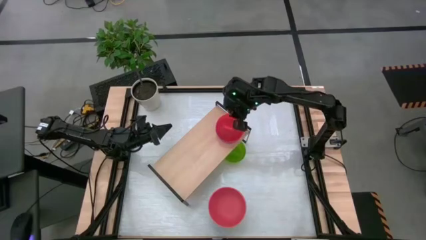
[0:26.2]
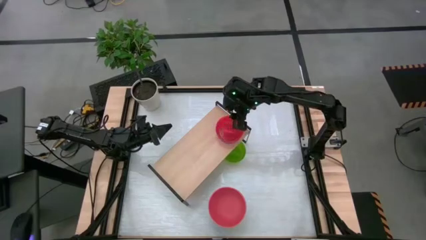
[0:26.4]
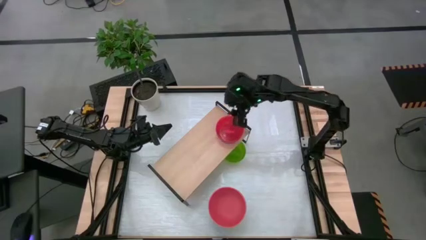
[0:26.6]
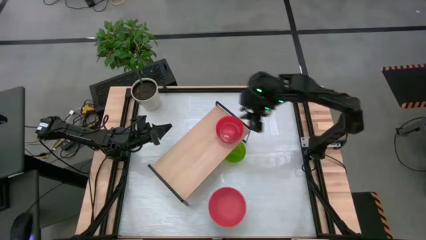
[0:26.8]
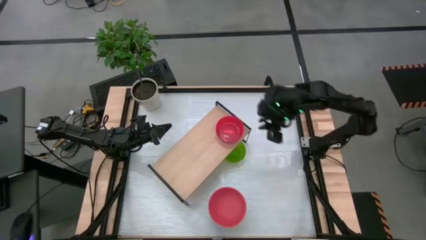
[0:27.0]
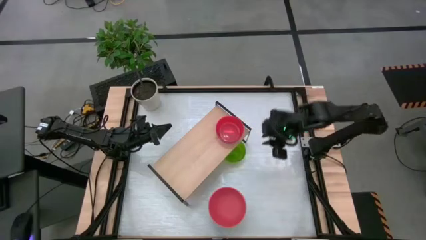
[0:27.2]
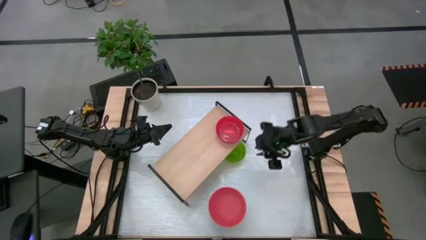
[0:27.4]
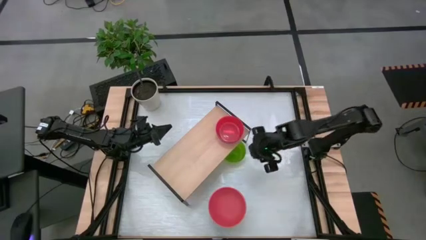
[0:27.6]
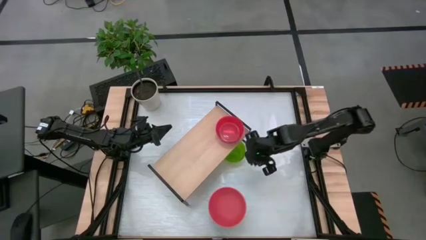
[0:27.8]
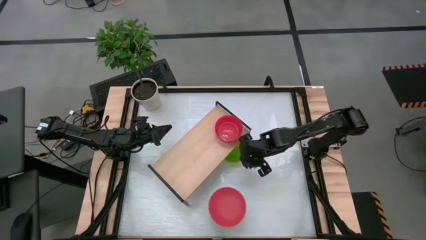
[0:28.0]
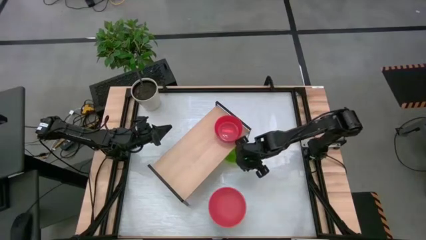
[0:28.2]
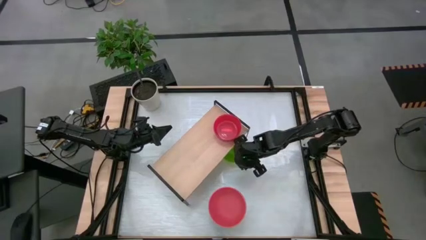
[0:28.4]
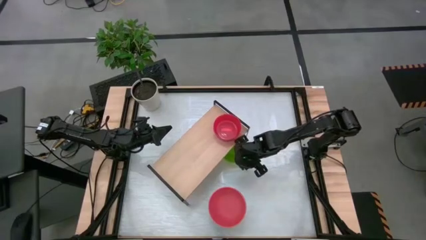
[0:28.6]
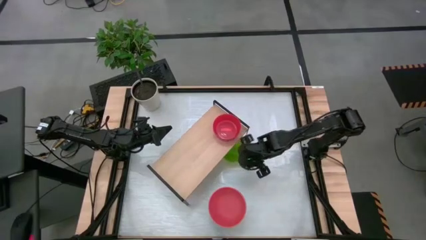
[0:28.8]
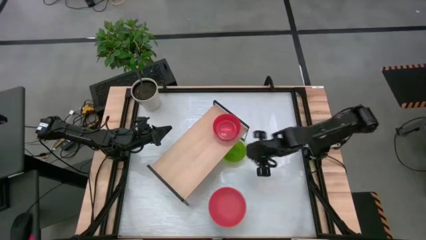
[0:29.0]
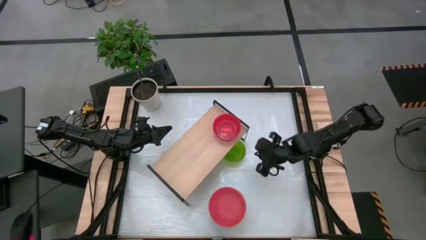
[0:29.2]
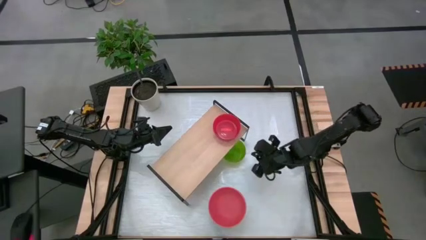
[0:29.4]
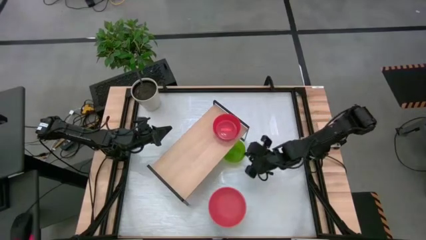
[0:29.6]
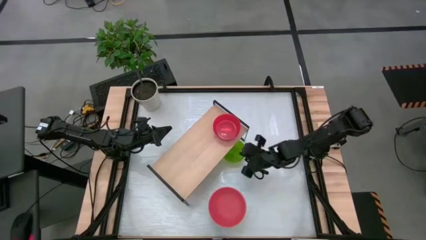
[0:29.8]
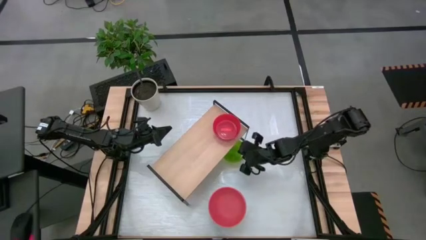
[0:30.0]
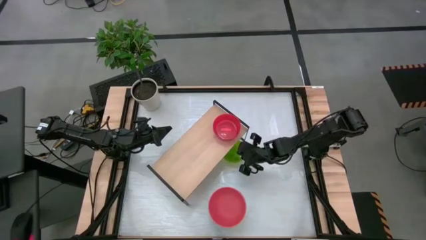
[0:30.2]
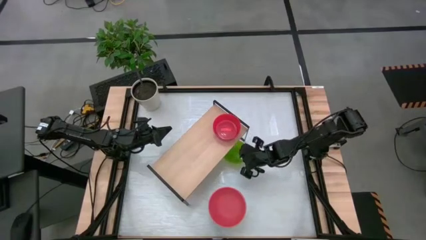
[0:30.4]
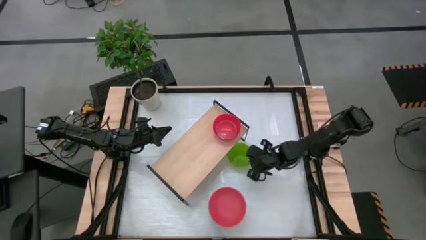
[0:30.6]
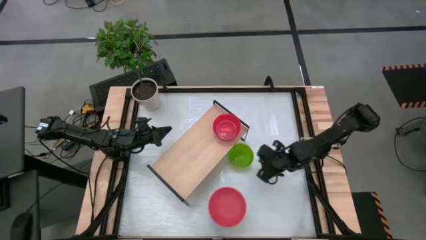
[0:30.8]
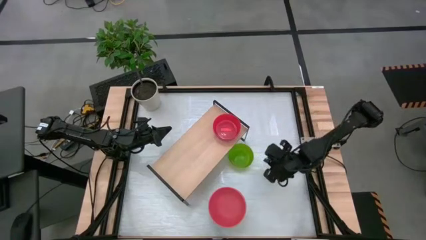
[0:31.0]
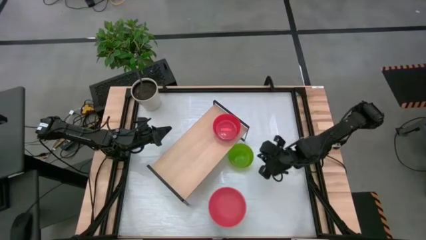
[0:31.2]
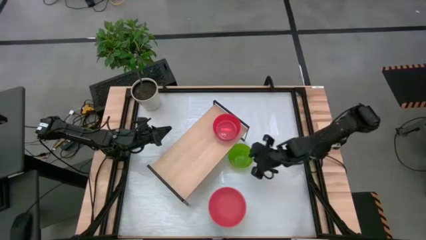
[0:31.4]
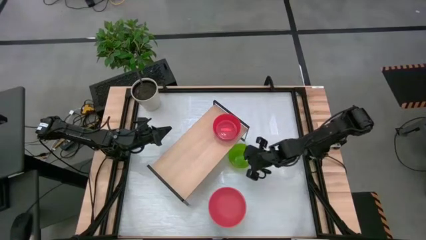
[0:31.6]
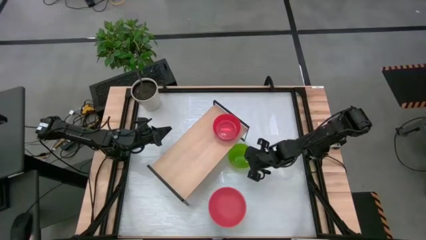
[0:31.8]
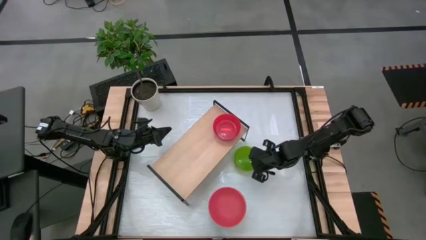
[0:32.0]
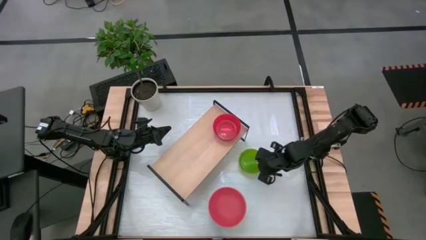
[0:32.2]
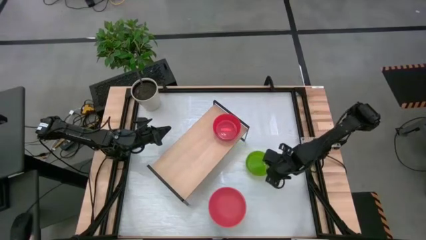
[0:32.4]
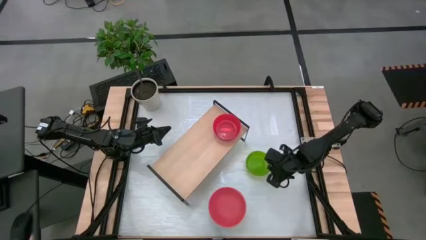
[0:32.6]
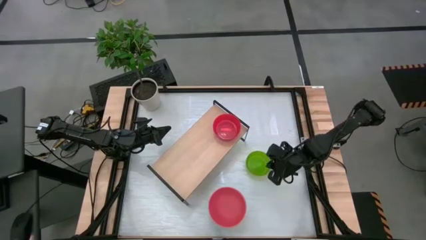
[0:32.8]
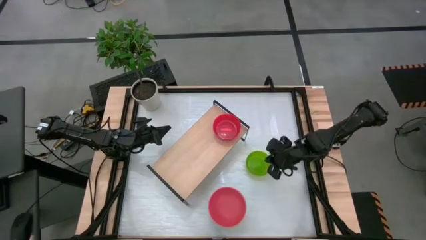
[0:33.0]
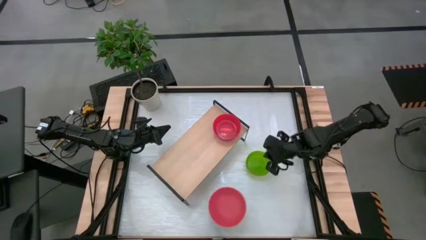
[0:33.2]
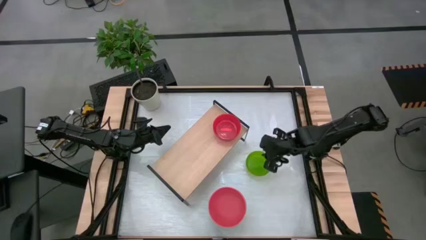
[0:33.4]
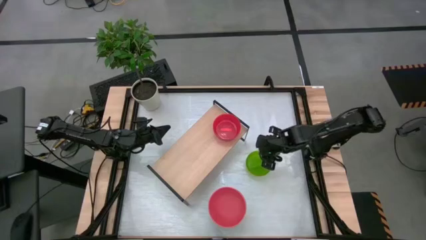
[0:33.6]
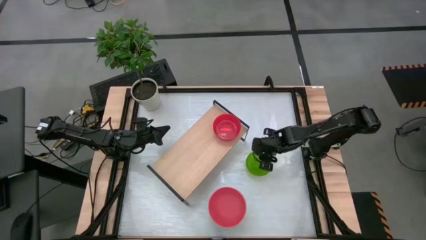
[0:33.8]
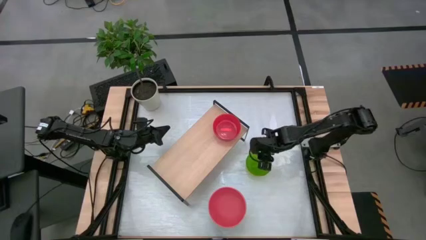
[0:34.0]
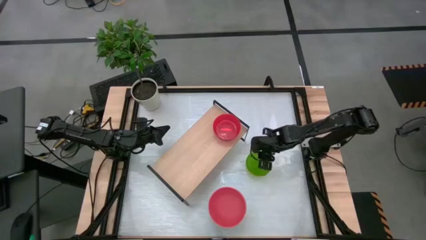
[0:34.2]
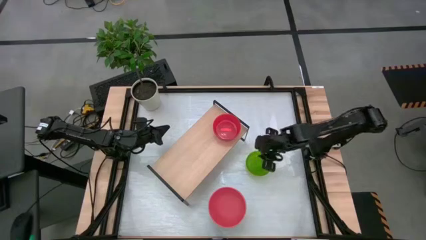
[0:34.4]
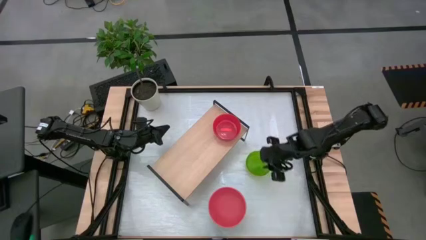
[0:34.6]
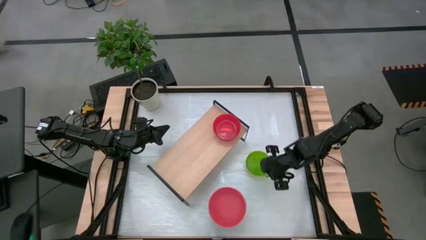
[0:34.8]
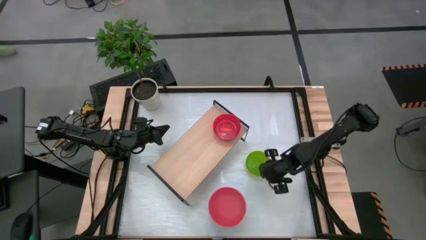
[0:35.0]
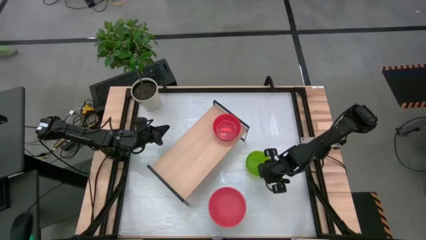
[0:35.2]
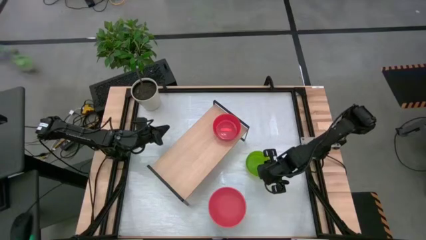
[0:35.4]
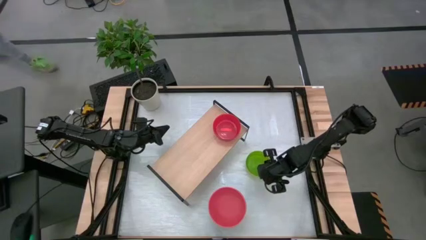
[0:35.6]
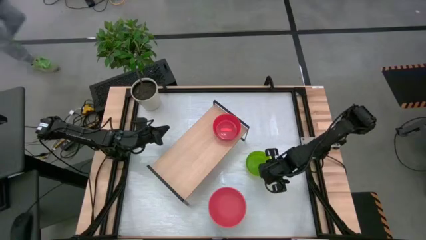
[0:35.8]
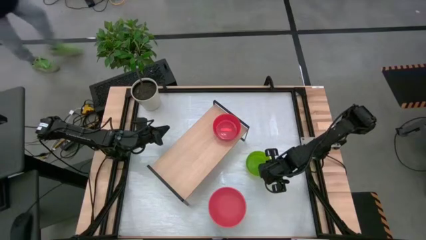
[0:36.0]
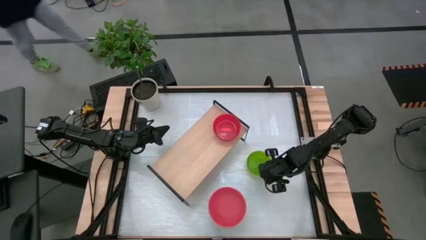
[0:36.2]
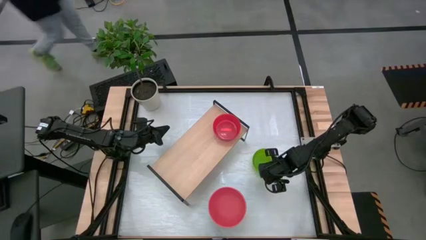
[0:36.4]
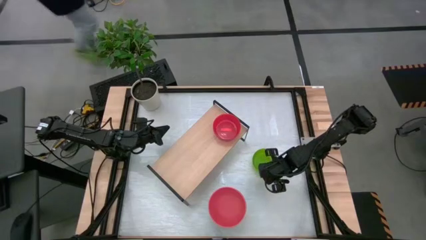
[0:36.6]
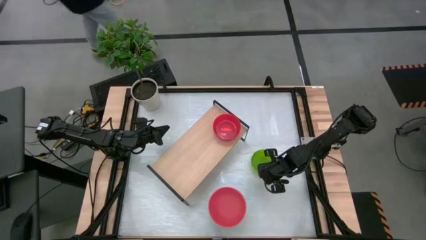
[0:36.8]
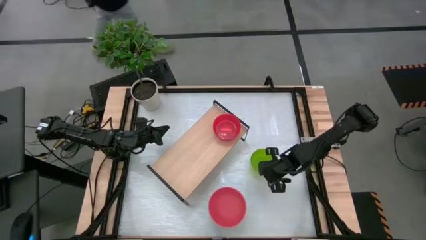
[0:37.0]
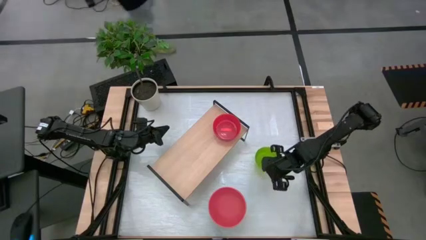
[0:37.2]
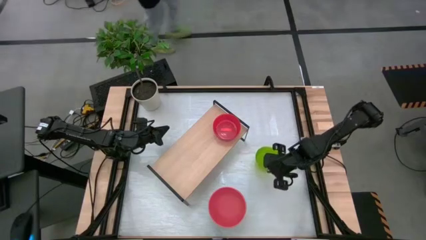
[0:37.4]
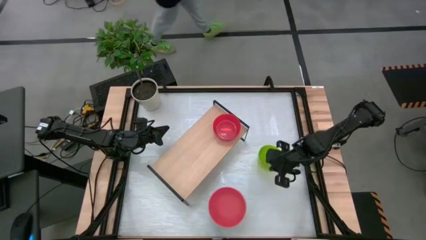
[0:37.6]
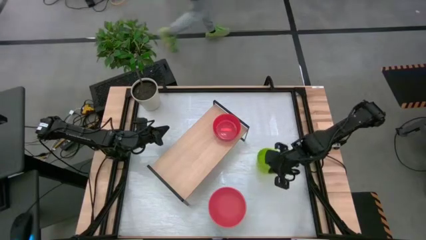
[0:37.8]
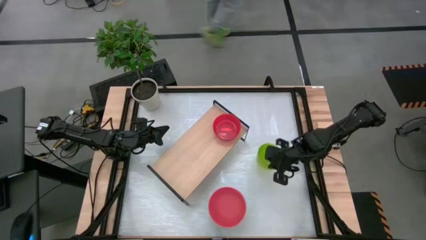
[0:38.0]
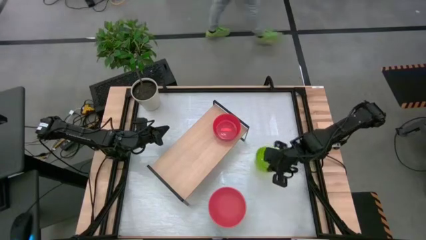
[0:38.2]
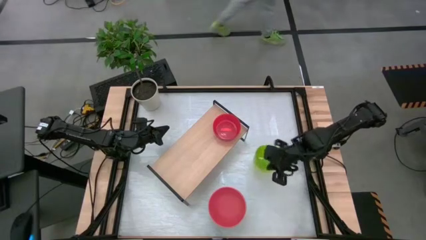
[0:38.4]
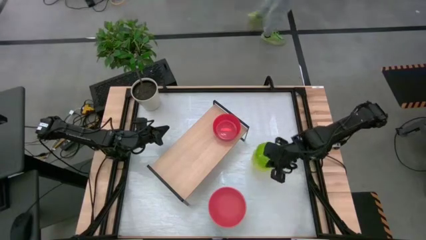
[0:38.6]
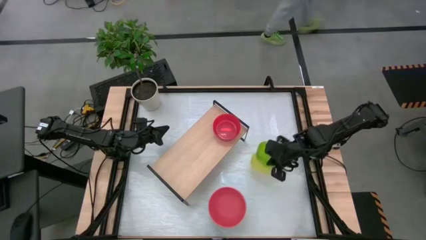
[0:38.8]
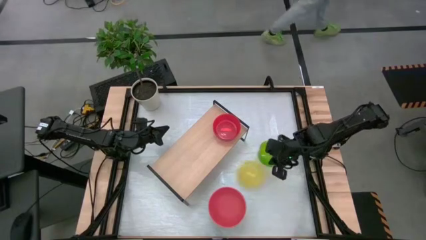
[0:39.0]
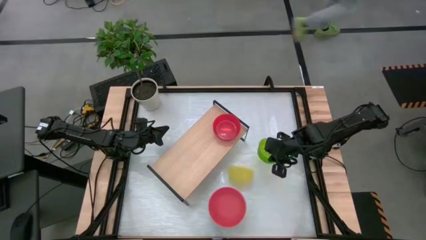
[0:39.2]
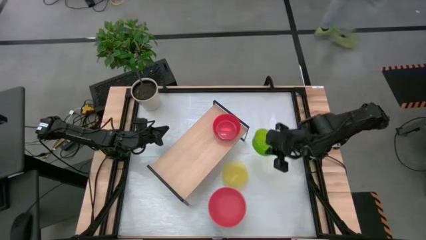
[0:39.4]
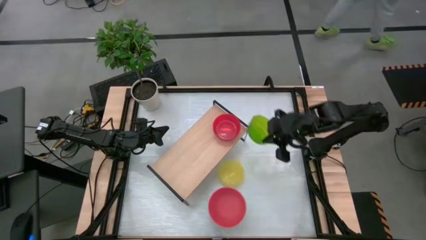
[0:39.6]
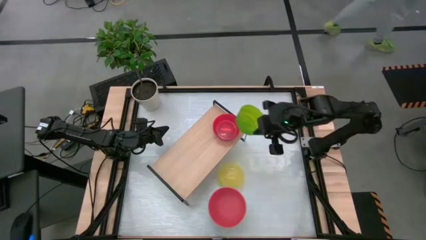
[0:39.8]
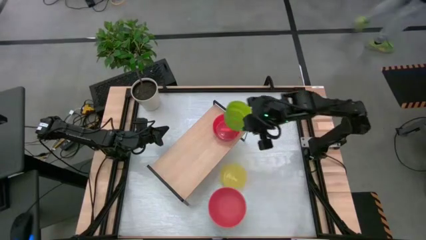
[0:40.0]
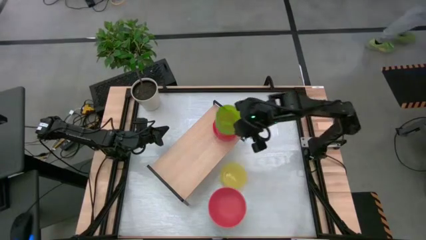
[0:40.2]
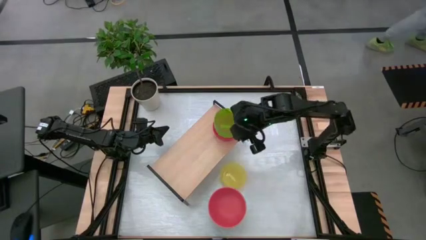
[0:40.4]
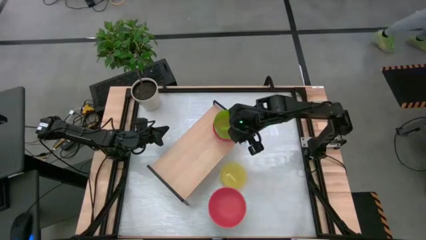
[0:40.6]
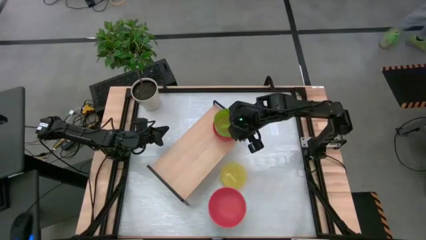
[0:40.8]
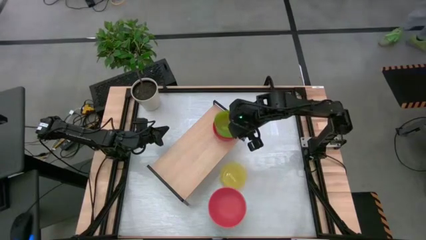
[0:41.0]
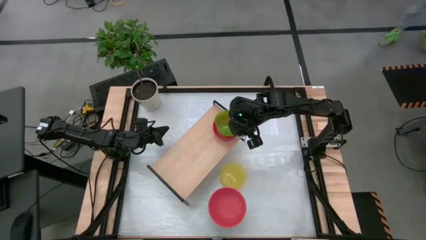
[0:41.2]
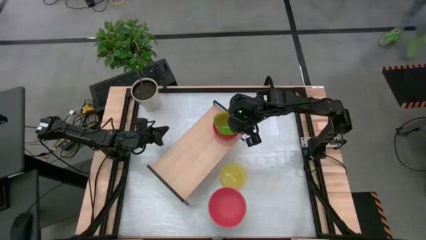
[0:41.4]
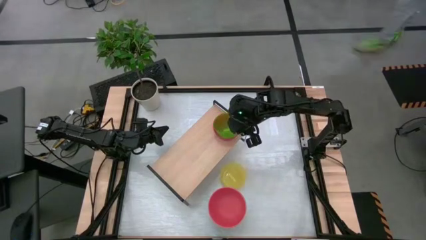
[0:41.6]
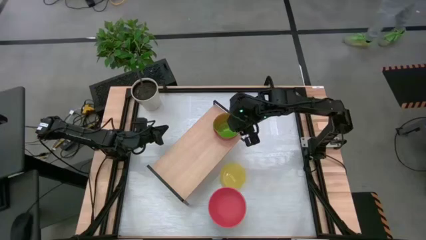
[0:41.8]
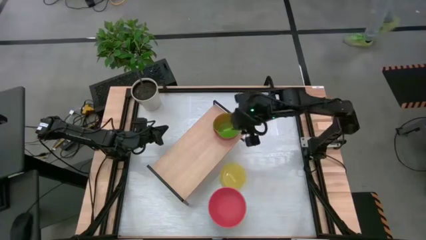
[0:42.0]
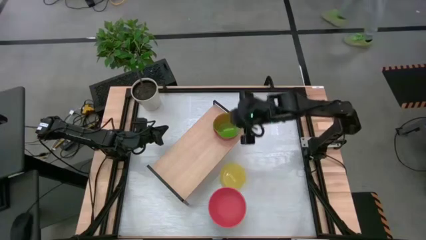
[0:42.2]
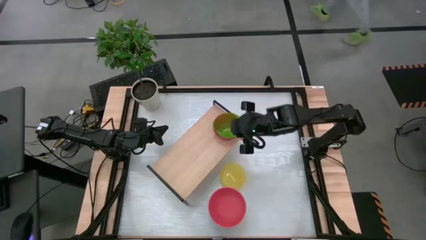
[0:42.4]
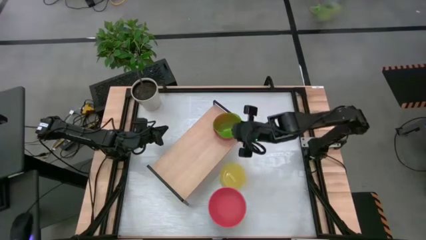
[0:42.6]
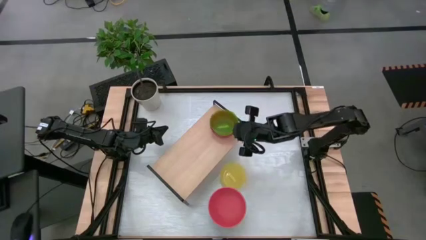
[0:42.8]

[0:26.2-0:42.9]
Task: Place and stack bowls onto a shelf
Stack the green bowl on top of the red bowl into the shelf
